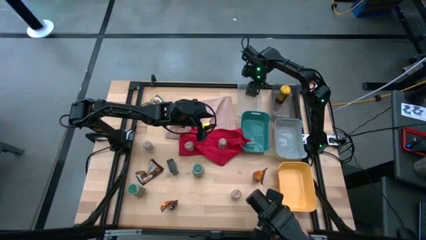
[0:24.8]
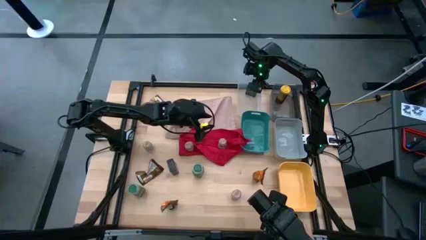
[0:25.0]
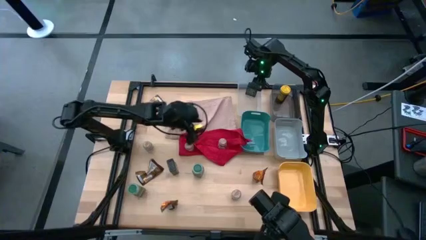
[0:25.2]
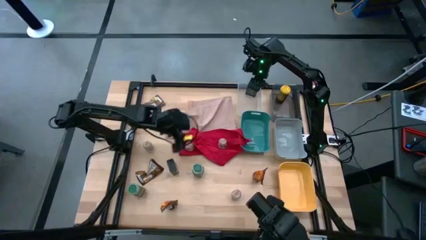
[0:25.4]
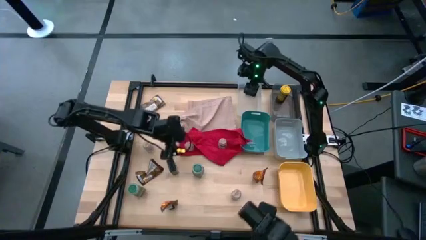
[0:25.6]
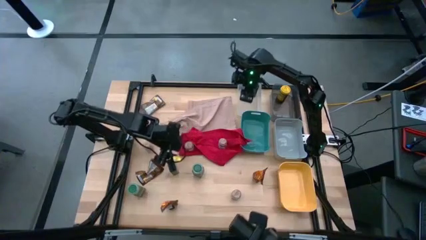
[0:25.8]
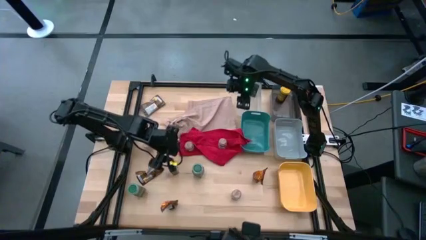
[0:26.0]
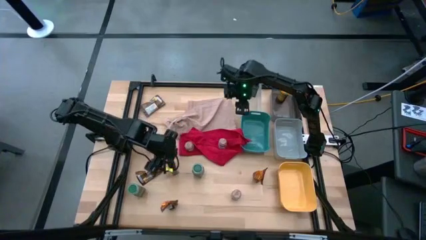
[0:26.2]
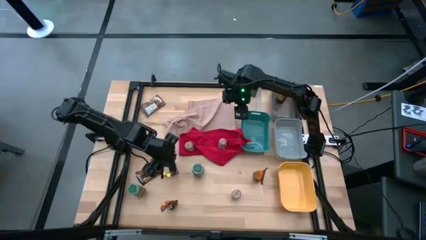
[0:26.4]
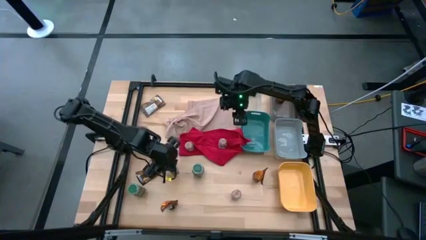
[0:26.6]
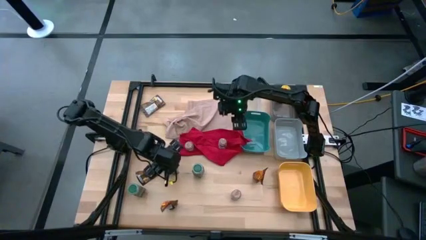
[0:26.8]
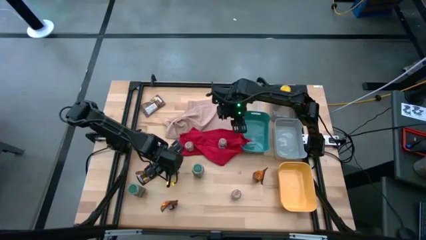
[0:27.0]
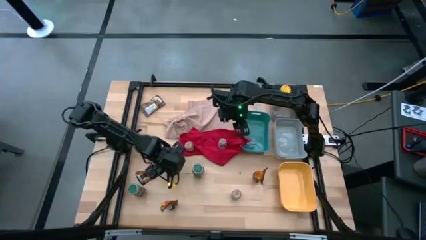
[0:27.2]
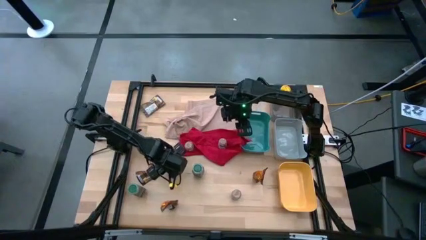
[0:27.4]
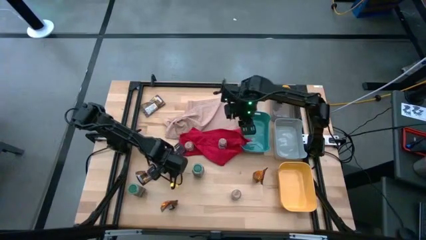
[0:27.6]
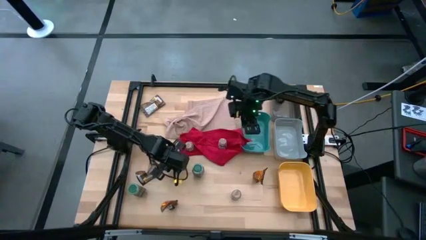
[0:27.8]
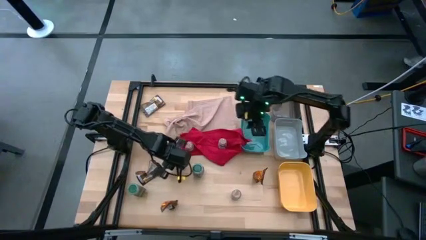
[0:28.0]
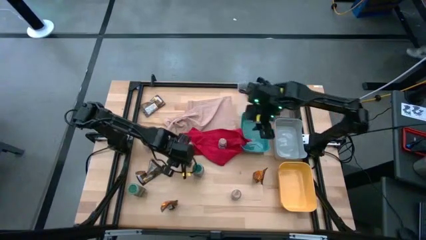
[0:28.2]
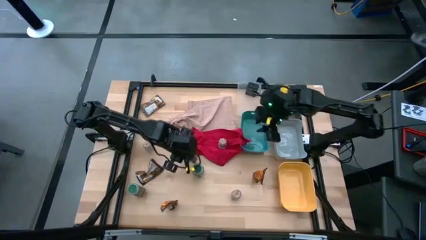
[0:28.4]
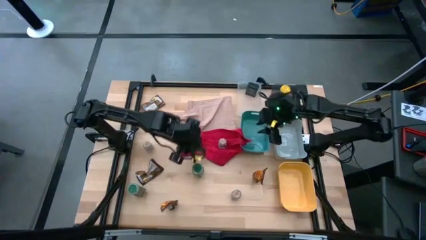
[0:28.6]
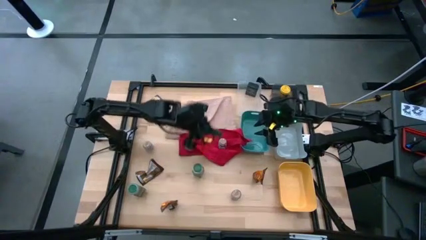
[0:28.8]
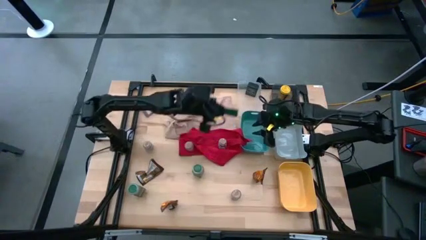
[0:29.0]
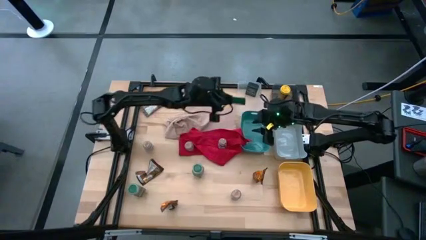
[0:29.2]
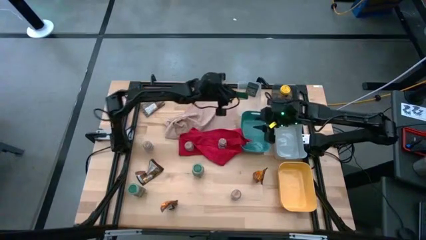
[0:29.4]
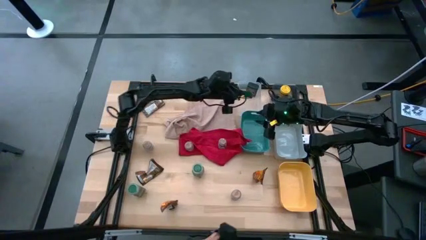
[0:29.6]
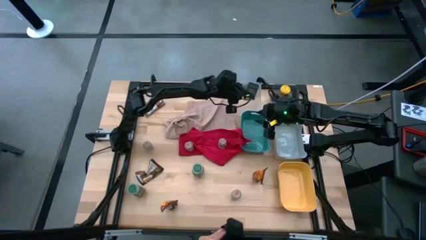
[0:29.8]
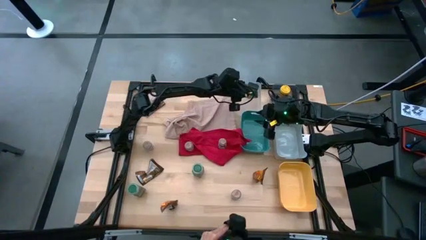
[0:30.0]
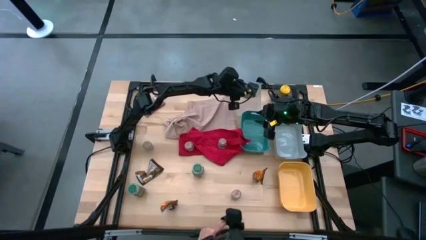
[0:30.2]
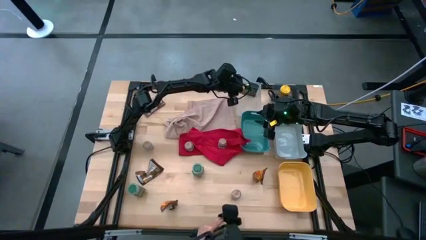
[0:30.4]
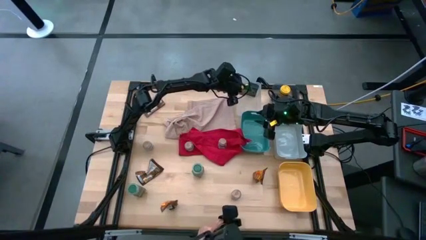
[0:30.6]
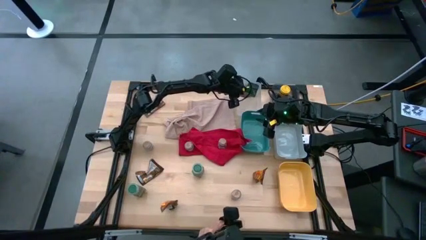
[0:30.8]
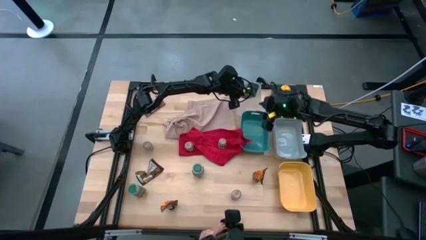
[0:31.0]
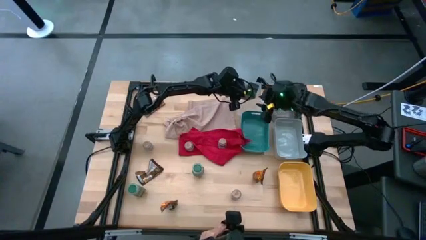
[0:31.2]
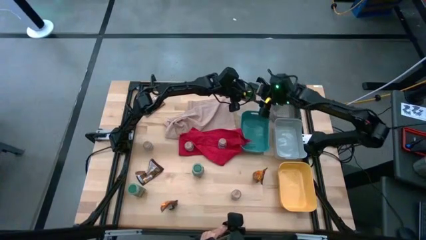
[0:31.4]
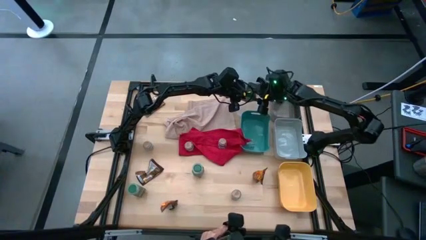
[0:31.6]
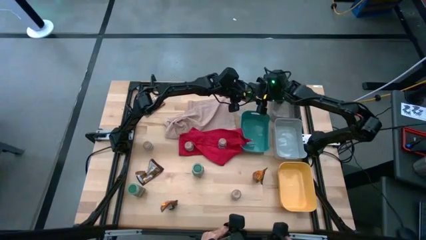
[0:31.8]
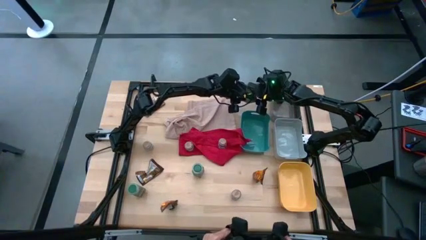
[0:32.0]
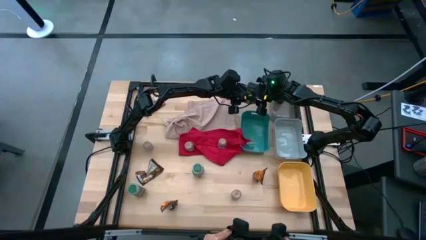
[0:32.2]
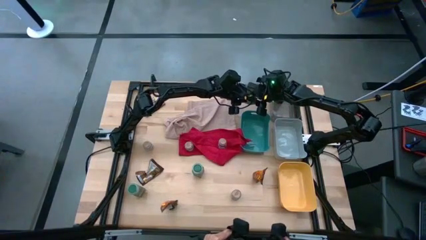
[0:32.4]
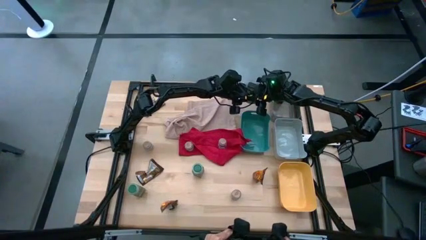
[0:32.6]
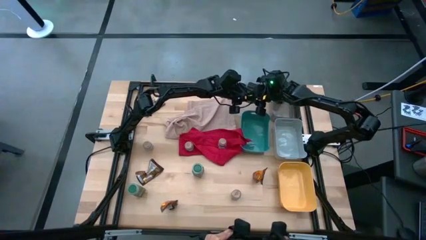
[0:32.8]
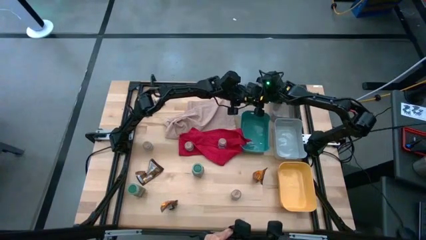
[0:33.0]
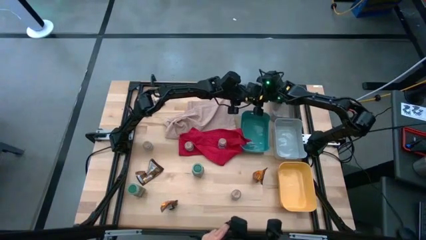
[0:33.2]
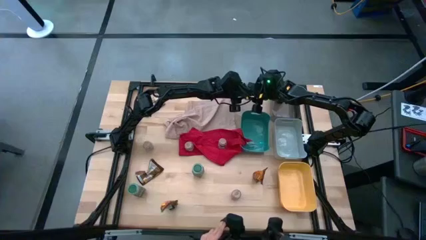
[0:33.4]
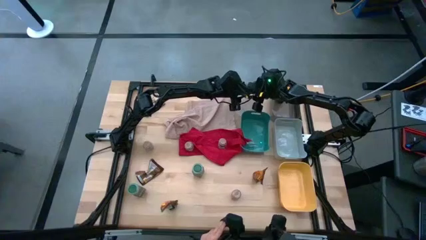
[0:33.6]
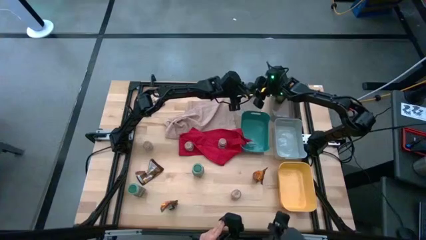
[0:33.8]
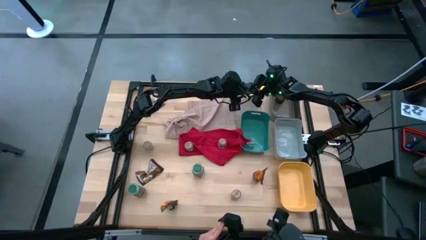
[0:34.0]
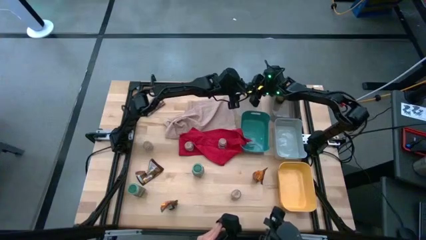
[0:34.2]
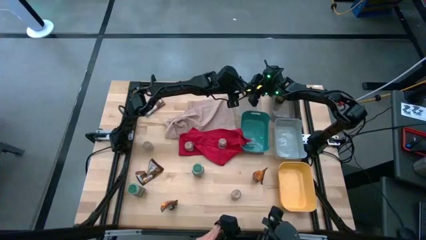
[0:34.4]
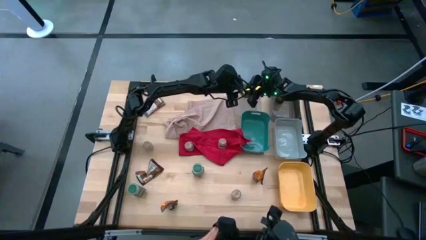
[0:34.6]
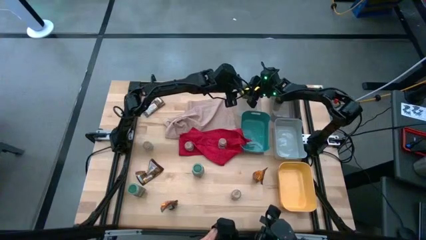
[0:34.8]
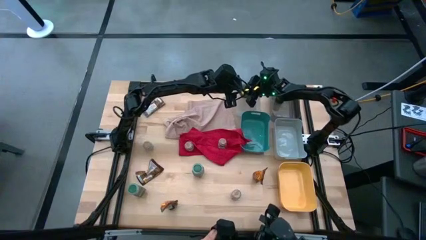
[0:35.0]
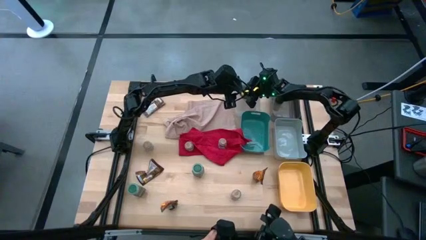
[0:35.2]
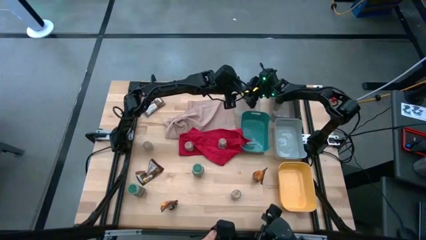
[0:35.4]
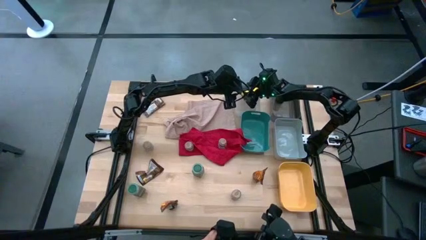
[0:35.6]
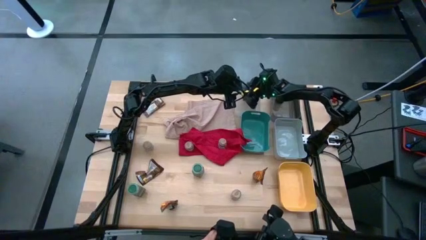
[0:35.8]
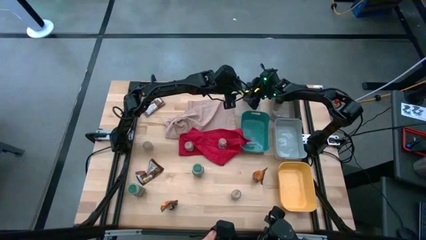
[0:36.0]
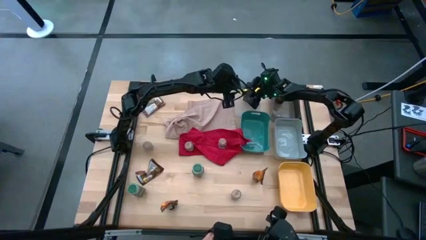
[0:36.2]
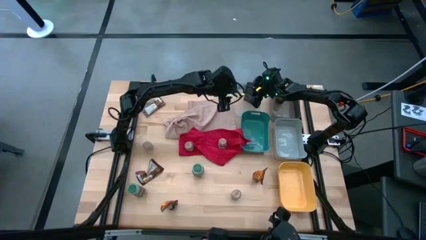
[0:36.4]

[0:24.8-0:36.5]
Task: Sort spices by type
Put the dark green seasoning can into the transparent bin

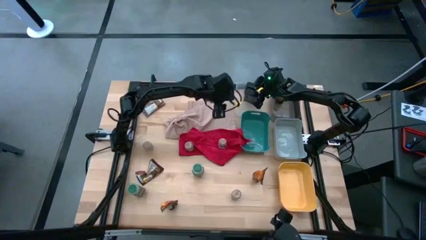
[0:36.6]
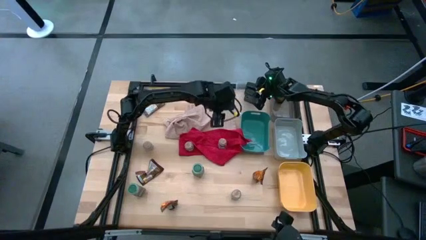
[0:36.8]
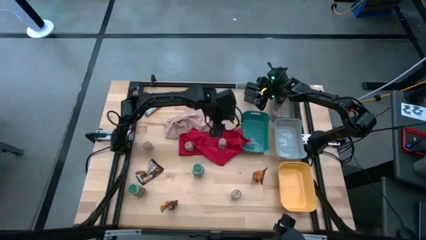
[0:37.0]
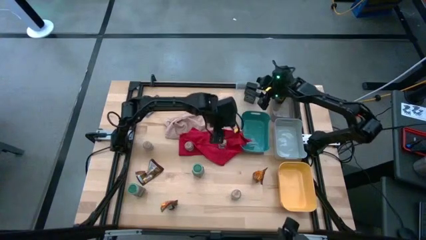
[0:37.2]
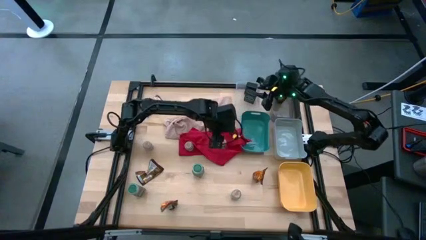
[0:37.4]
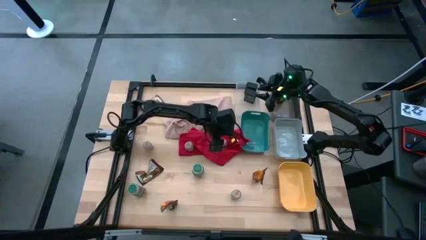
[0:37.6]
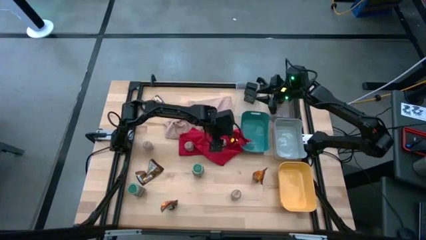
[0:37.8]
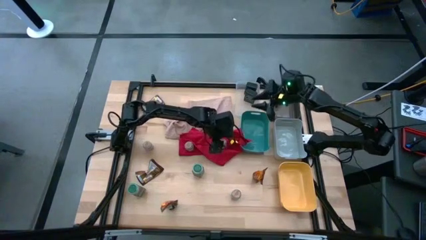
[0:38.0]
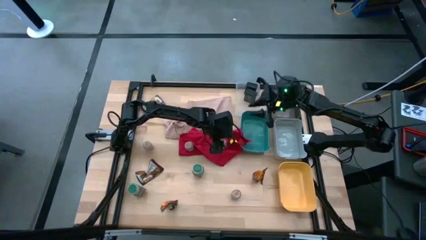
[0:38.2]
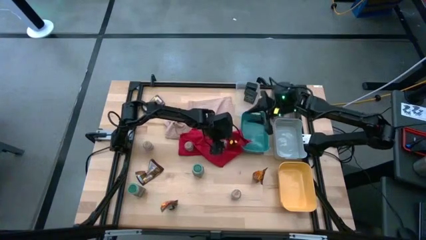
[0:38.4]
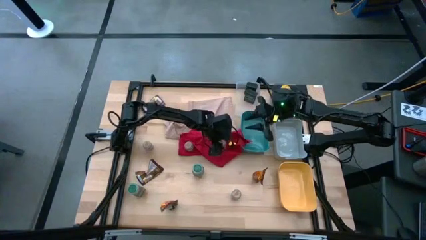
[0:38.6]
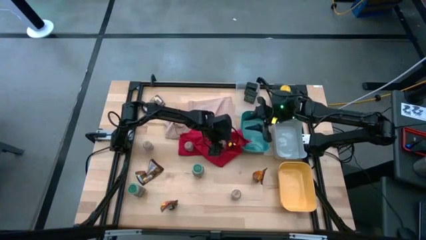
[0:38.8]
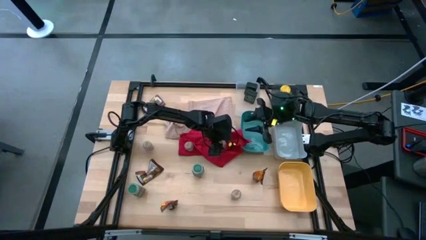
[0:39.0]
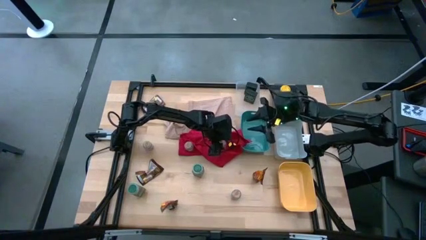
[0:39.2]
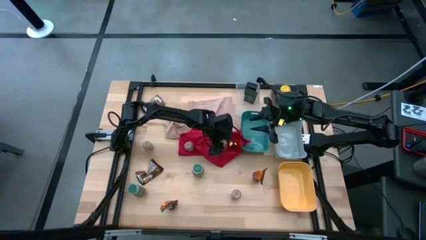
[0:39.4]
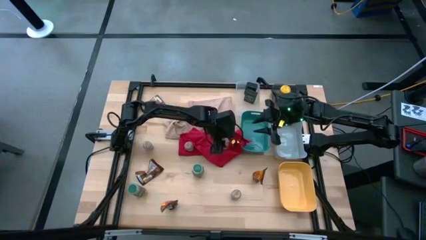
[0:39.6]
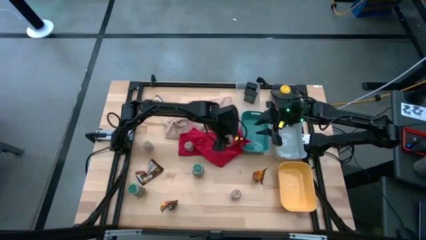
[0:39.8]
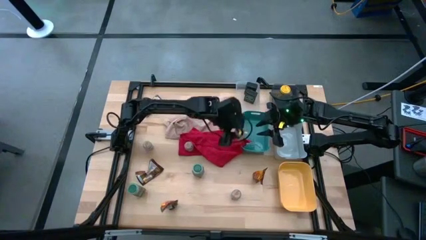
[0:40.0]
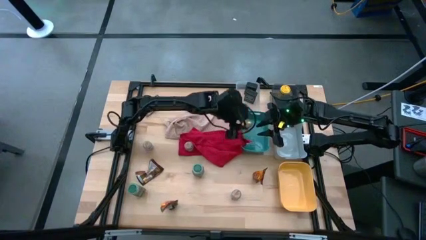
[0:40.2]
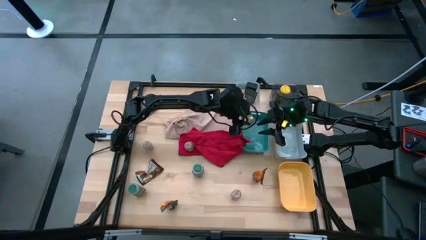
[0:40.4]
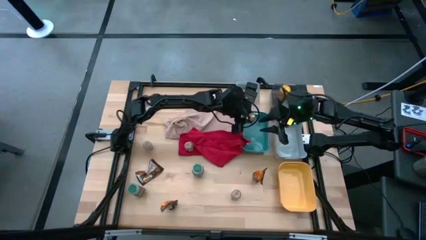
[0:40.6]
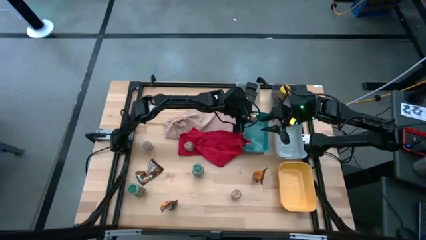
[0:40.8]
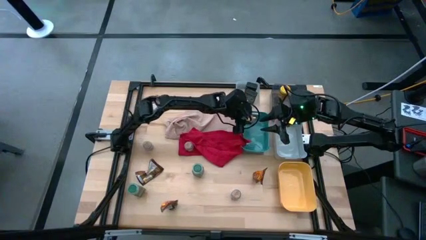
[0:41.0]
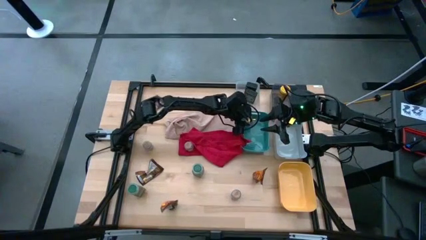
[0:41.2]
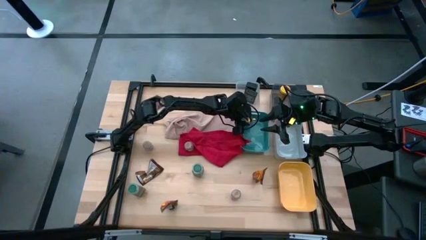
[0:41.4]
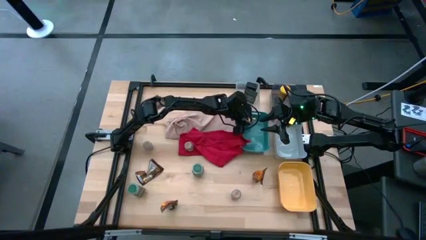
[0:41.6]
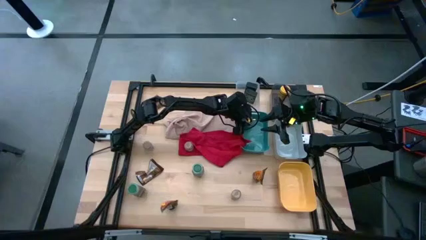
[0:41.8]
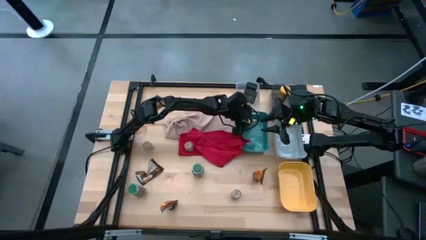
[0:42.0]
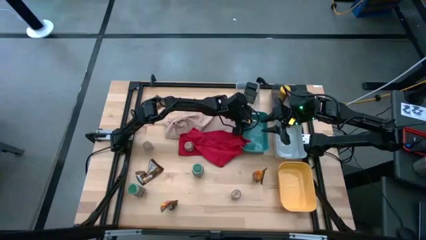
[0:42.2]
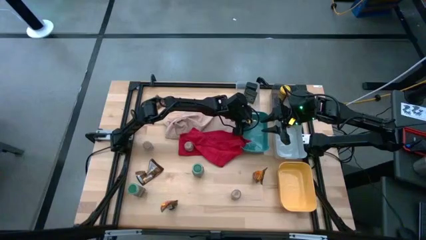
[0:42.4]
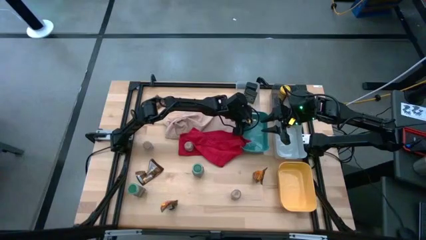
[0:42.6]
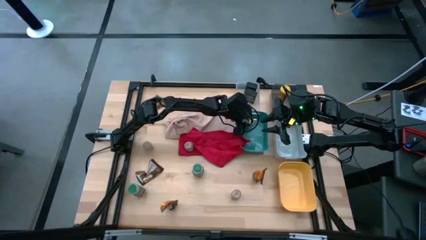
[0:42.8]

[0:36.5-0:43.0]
Put the top right transparent seasoning bottle into the blue bin
